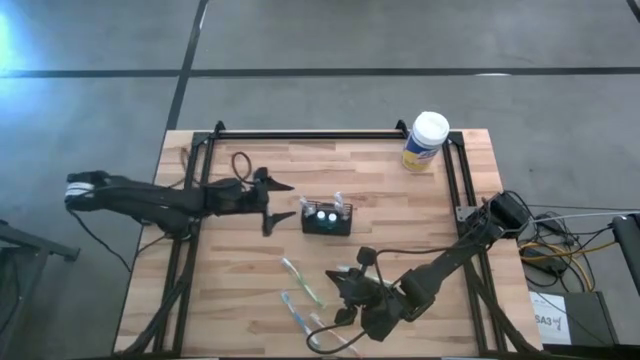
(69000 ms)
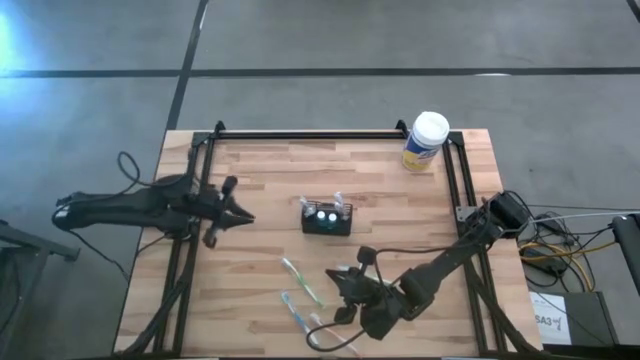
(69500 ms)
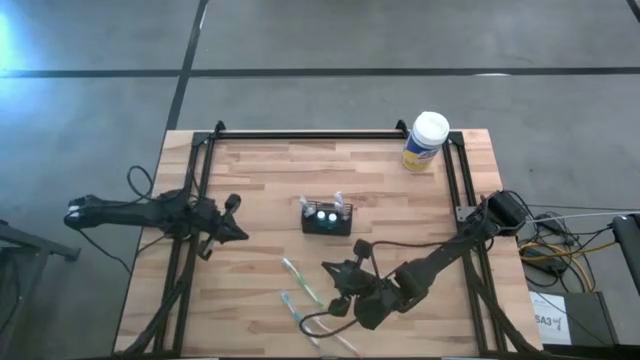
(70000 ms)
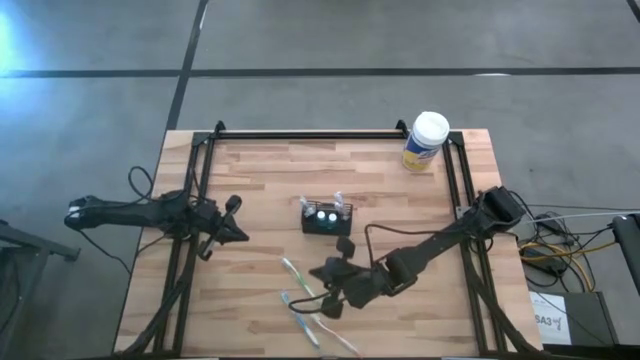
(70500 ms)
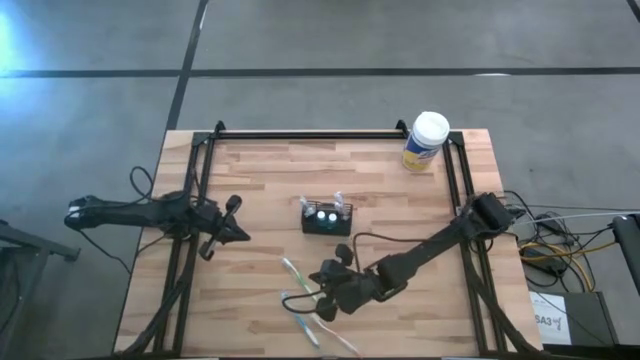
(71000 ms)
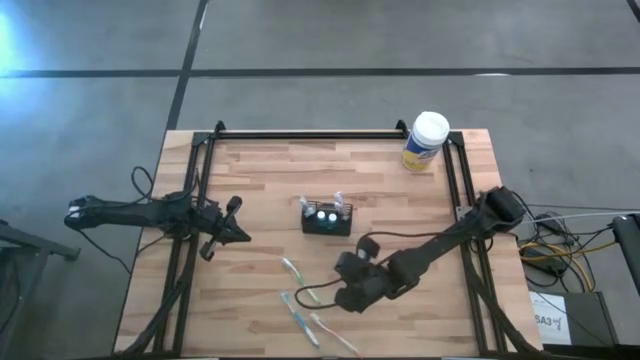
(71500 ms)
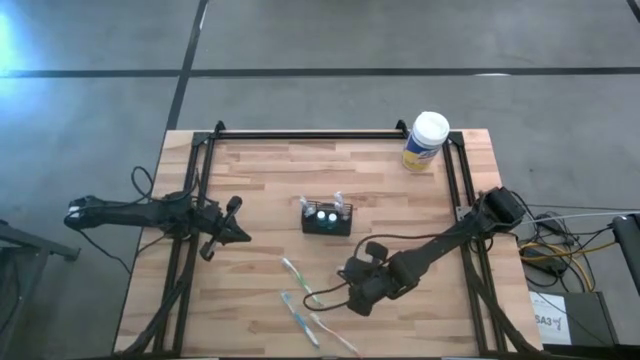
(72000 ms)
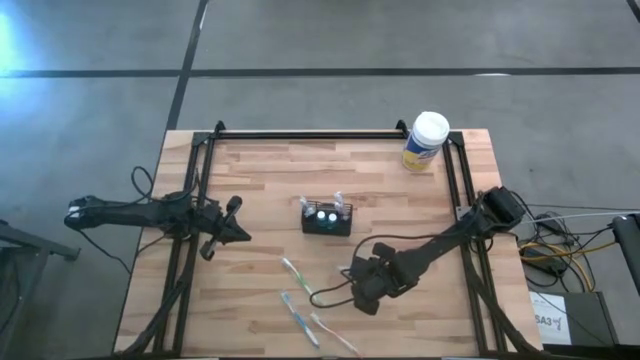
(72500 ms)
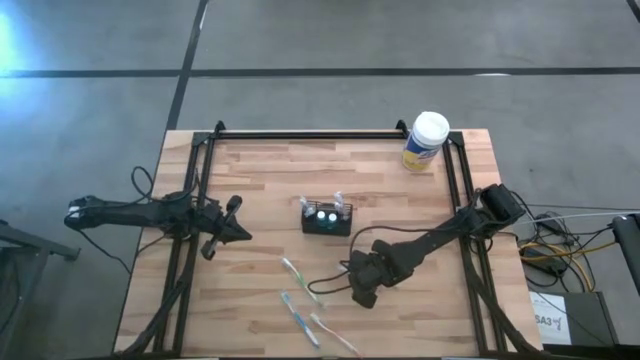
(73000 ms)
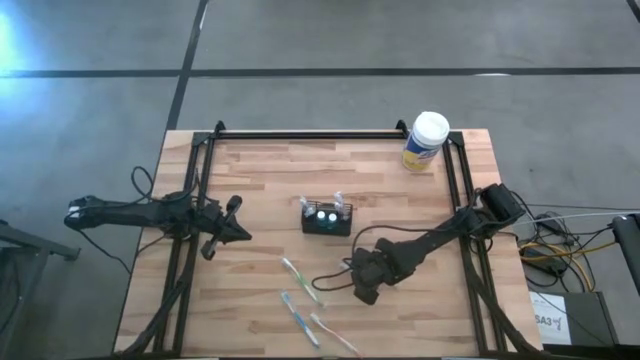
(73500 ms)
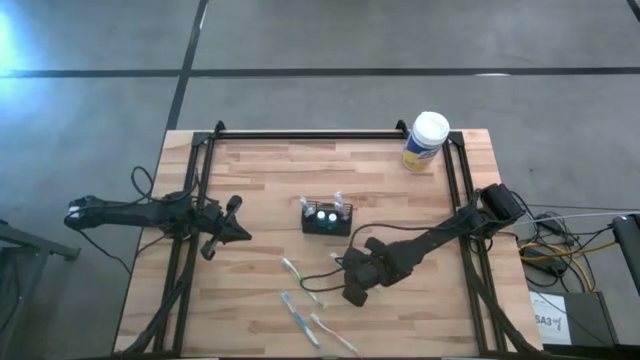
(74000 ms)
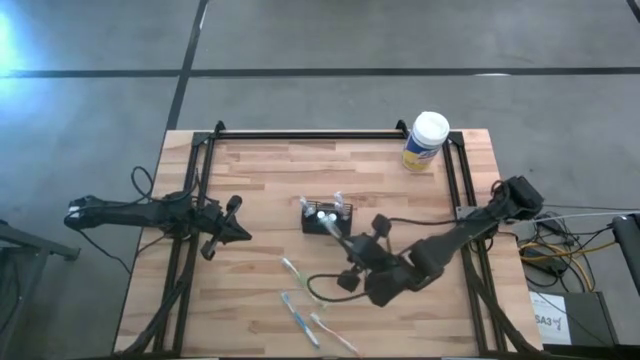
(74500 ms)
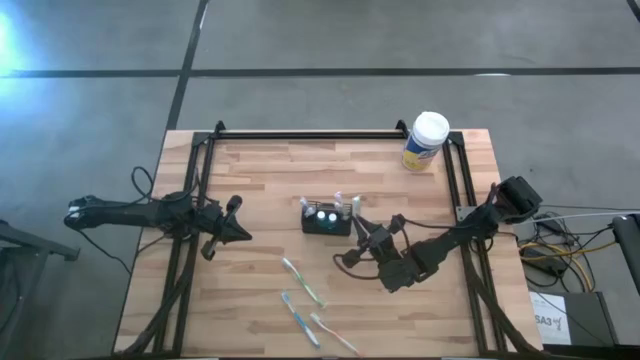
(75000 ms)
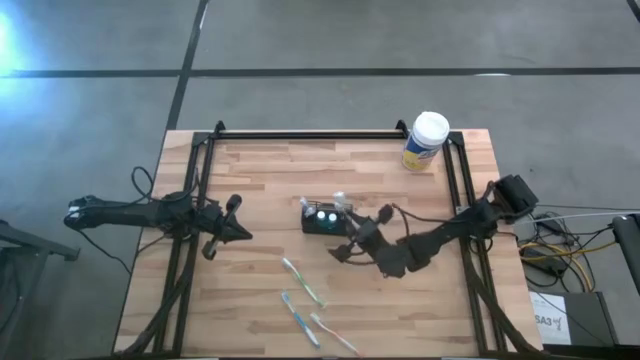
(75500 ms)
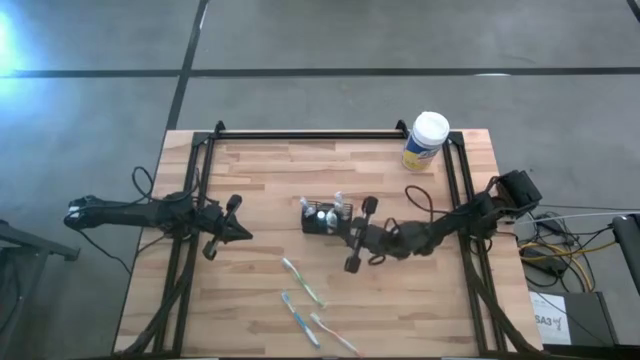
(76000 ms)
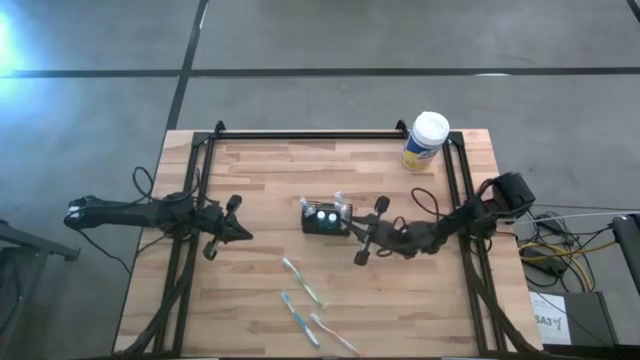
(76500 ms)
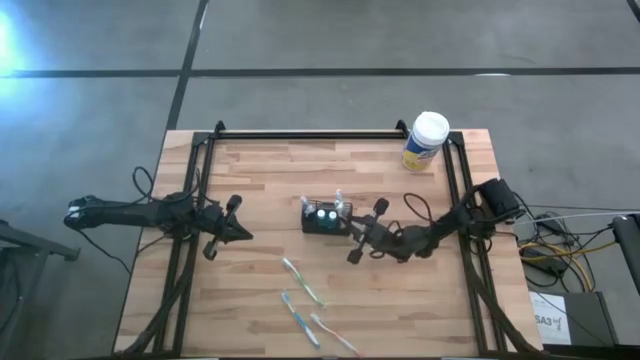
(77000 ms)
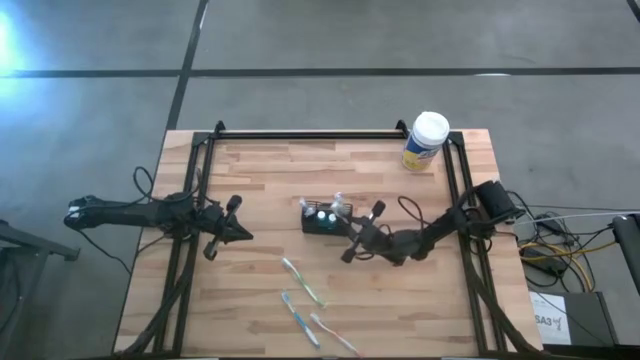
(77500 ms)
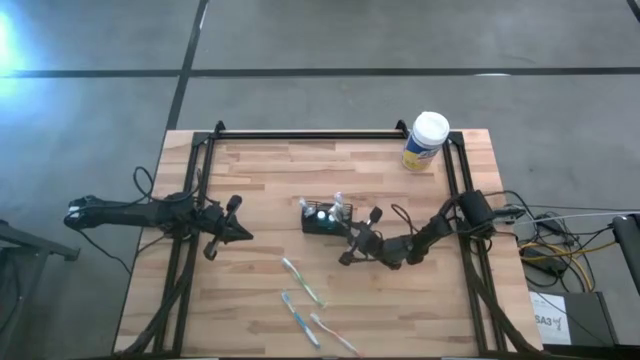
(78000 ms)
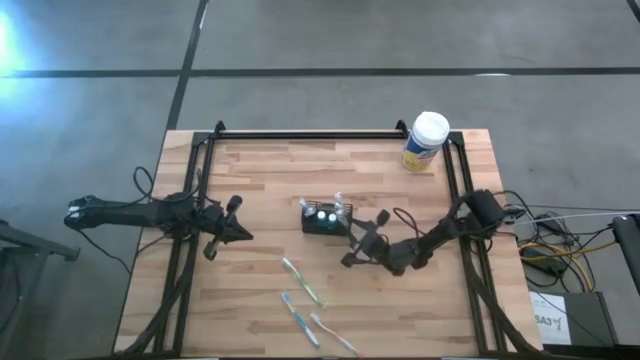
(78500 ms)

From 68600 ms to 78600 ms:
Task: Pick & Place toothbrushing station
Put the right green toothbrush into the black mesh organizer

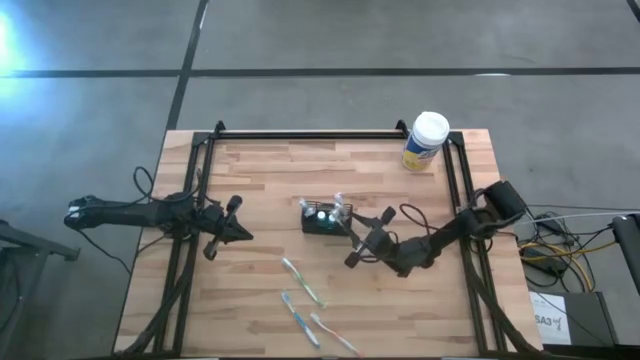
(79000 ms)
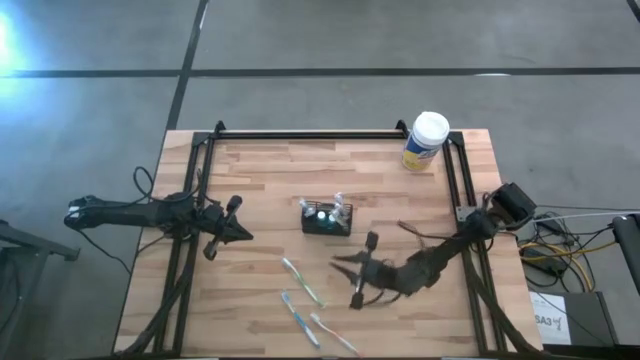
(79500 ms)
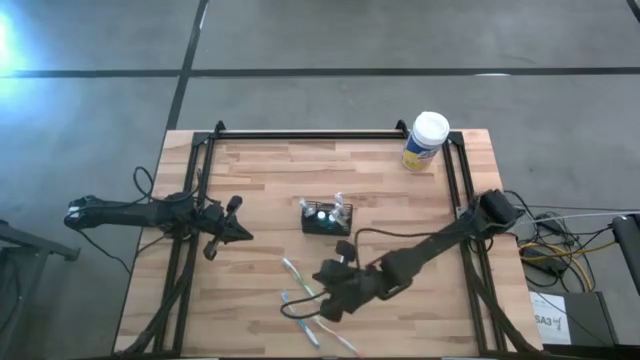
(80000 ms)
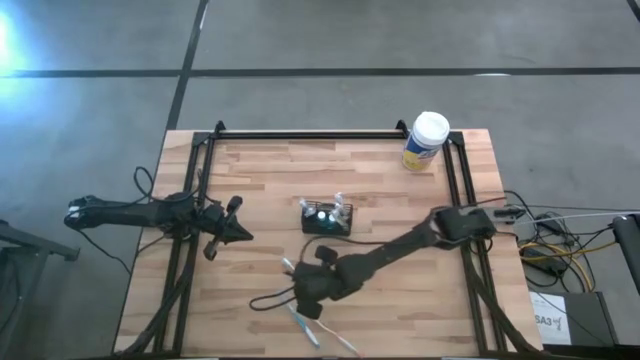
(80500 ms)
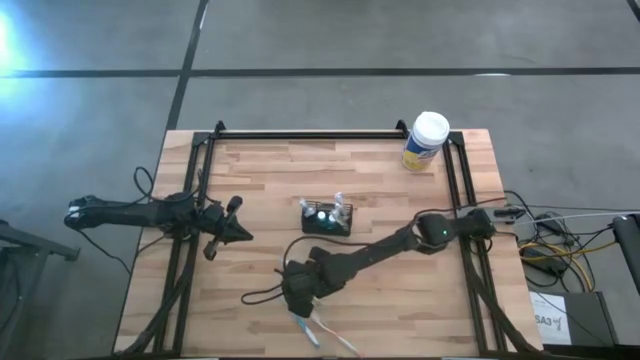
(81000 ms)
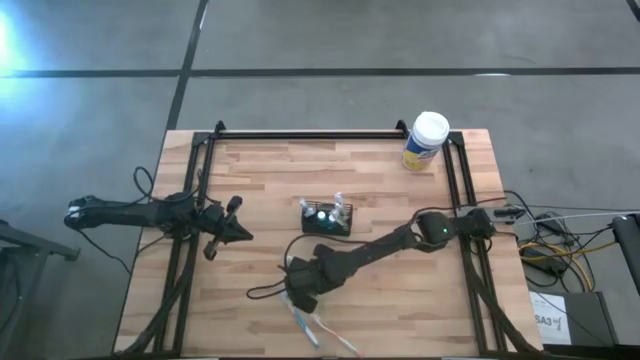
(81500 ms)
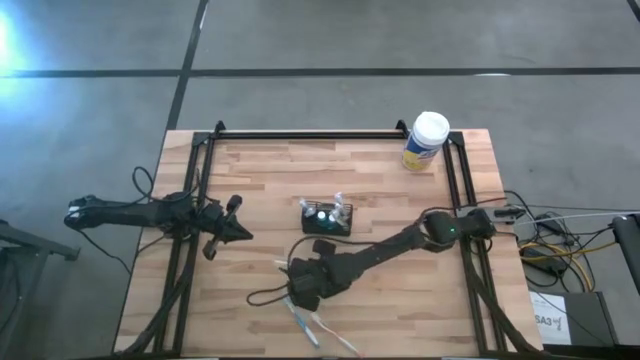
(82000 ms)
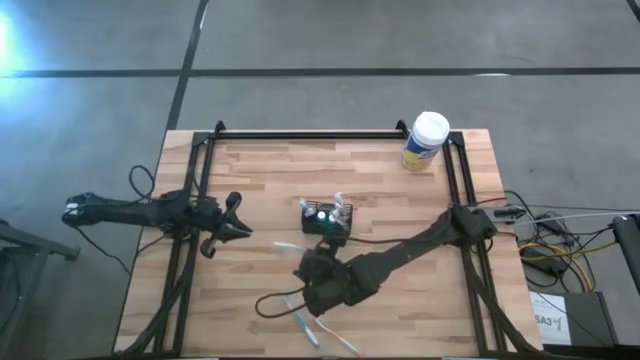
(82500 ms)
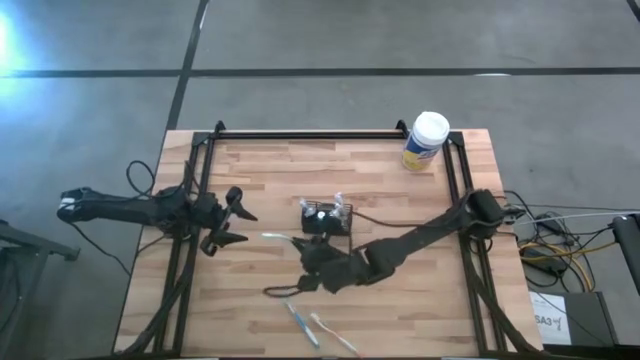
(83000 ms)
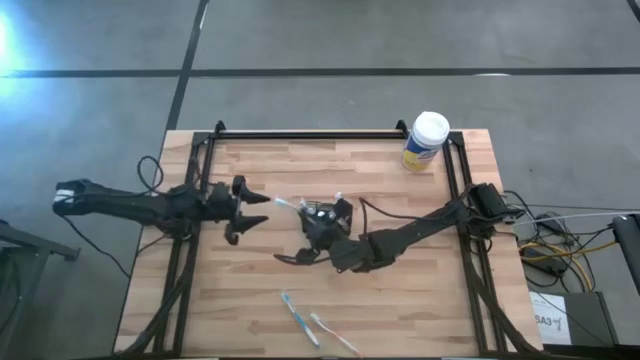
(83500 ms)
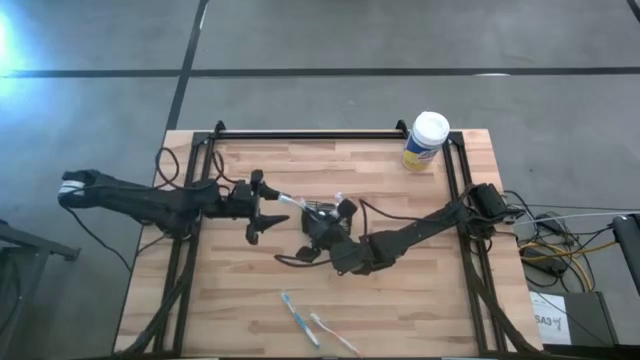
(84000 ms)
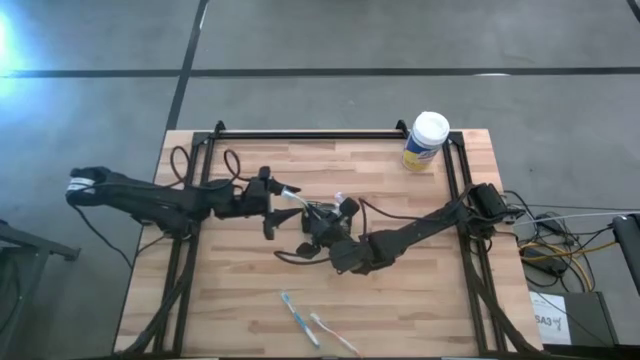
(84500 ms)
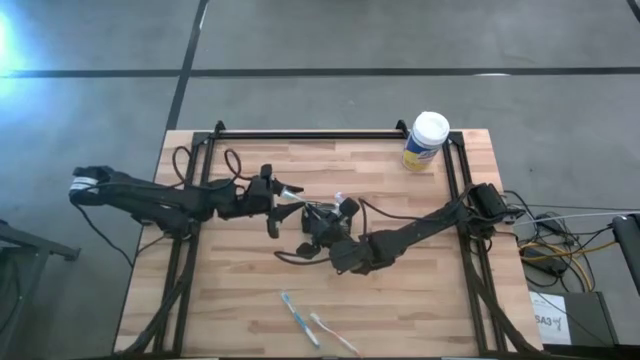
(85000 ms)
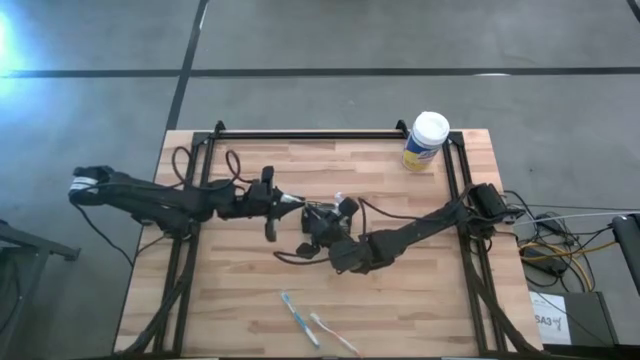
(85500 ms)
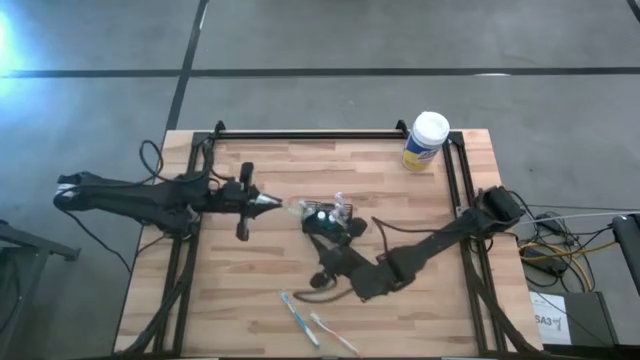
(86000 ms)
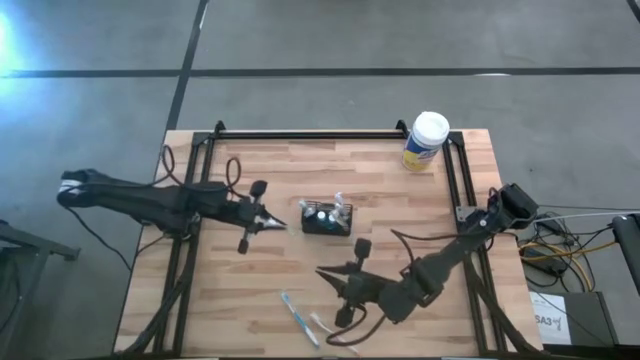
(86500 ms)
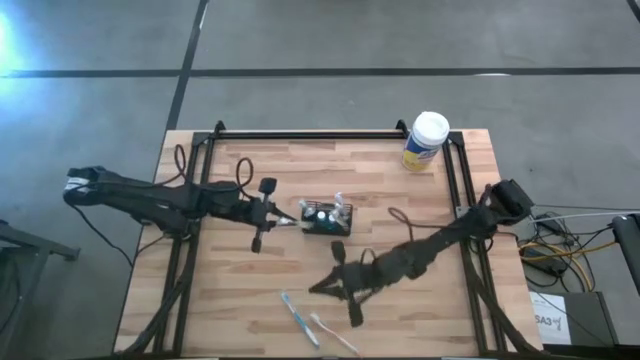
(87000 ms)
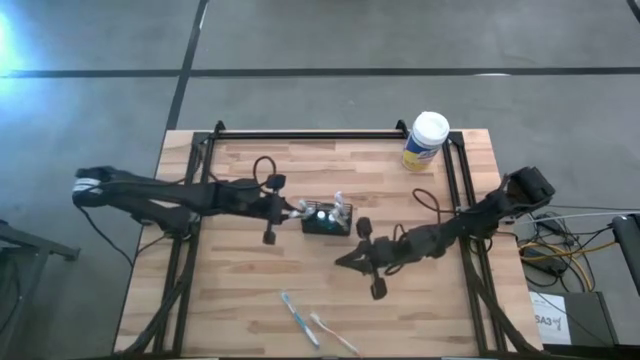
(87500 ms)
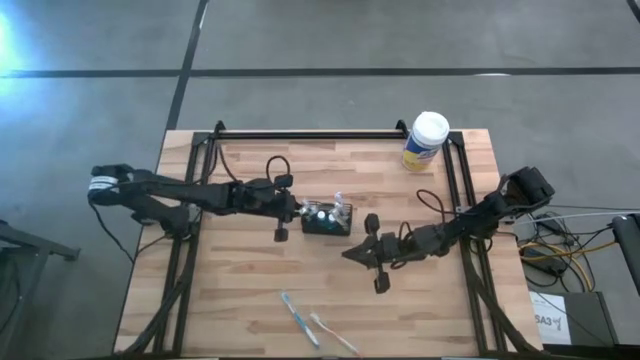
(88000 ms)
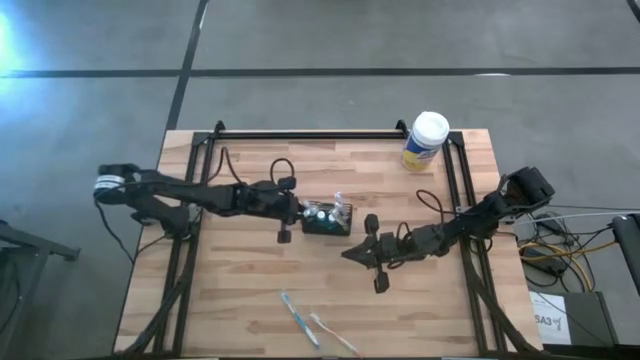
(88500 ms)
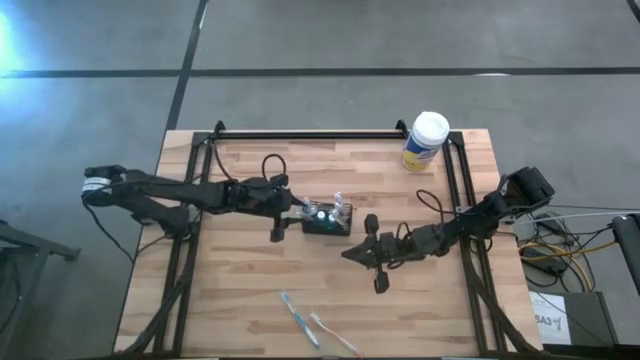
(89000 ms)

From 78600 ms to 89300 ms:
Put the green toothbrush into the black mesh organizer

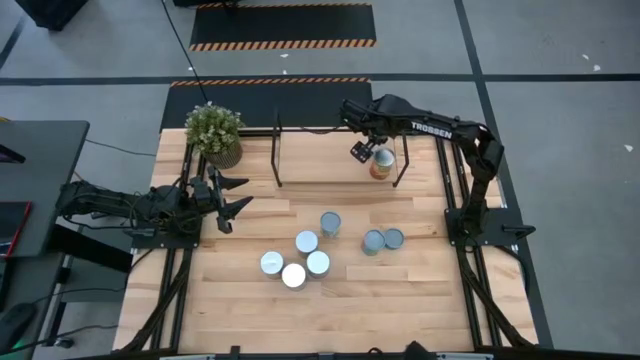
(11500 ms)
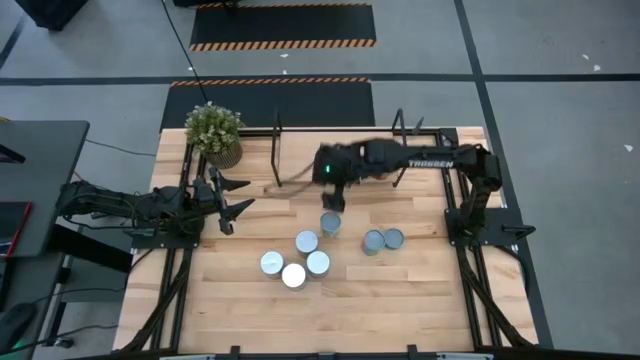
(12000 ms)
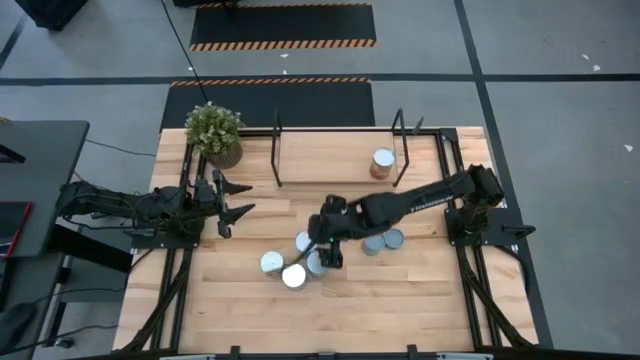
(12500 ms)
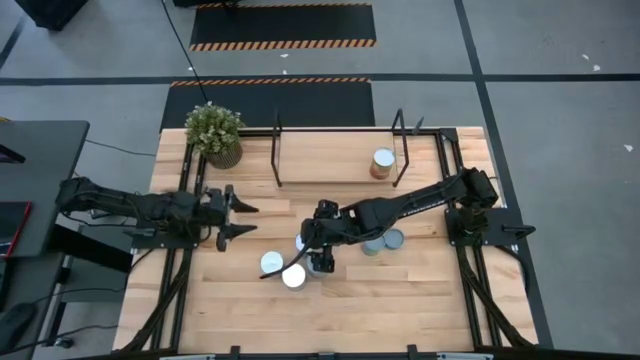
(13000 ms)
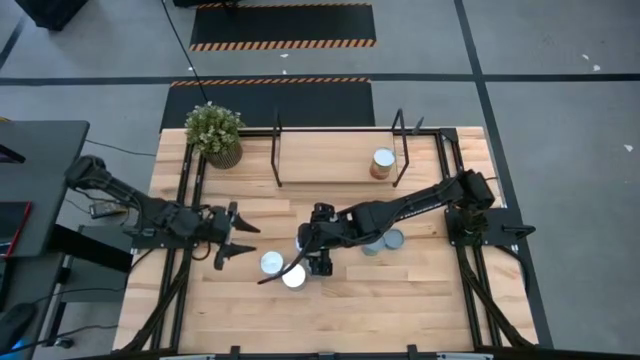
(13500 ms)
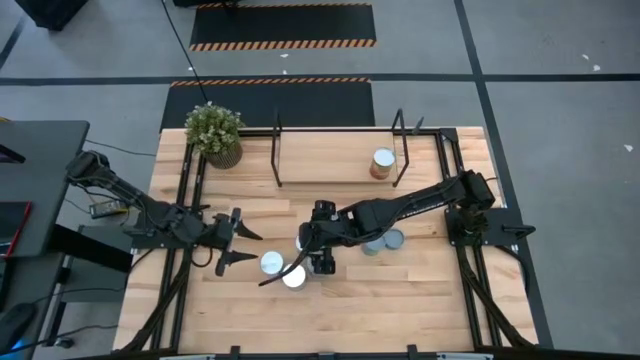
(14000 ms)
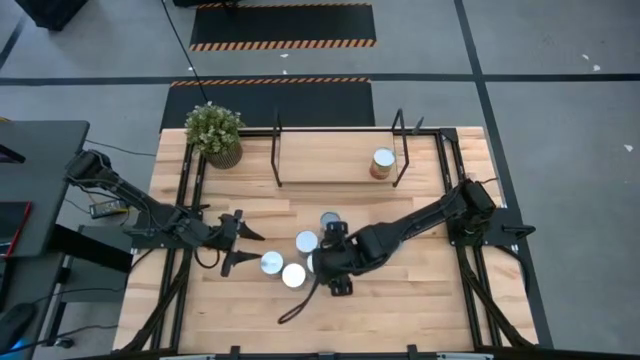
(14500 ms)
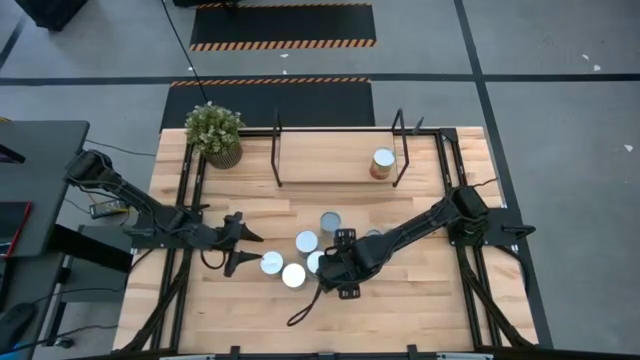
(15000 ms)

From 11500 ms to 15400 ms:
Task: Pick and place cans onto a shelf
Put the canned oranges on the shelf
